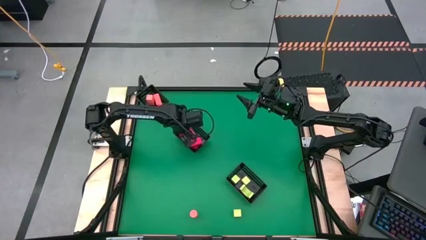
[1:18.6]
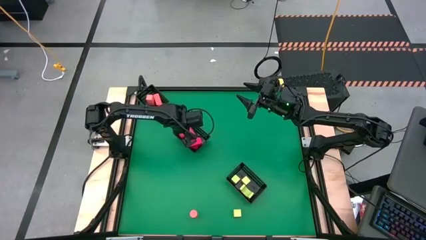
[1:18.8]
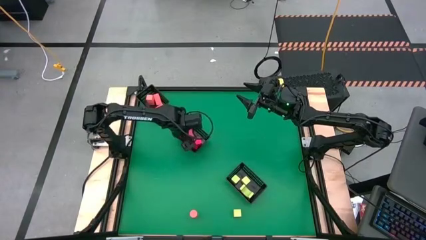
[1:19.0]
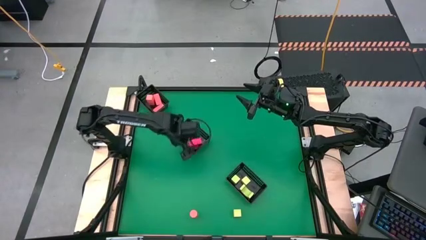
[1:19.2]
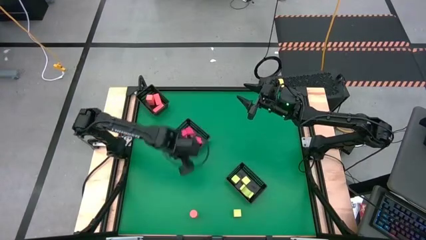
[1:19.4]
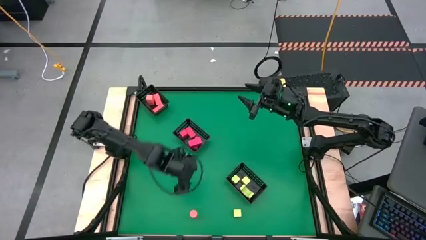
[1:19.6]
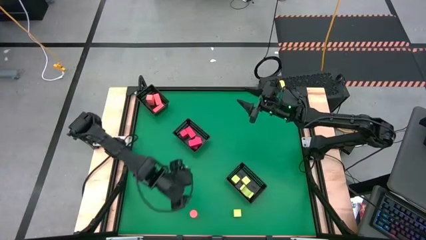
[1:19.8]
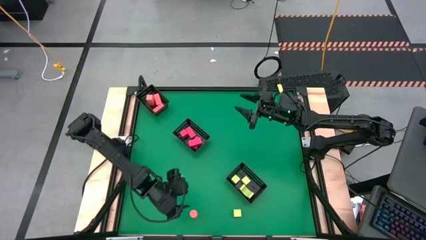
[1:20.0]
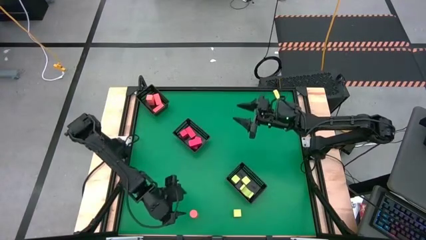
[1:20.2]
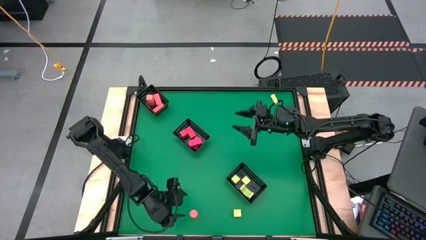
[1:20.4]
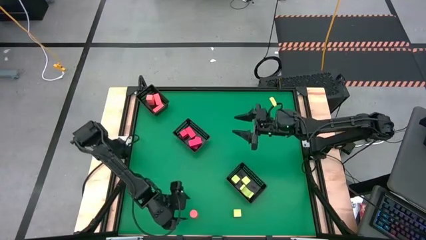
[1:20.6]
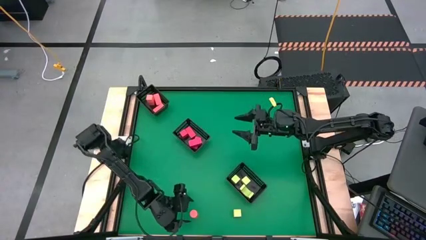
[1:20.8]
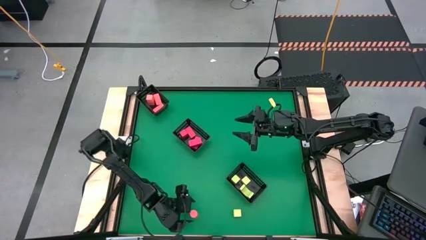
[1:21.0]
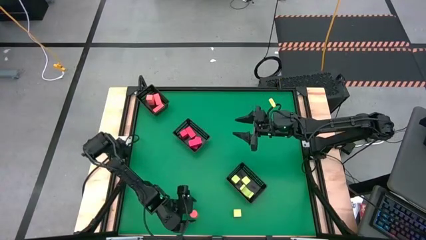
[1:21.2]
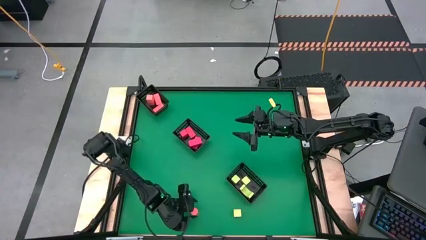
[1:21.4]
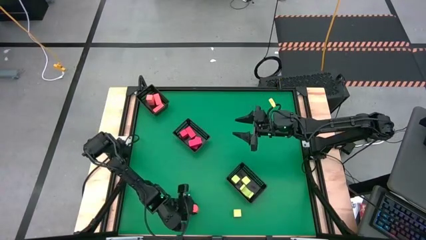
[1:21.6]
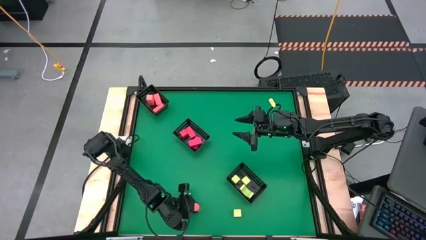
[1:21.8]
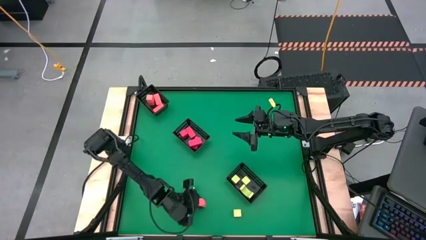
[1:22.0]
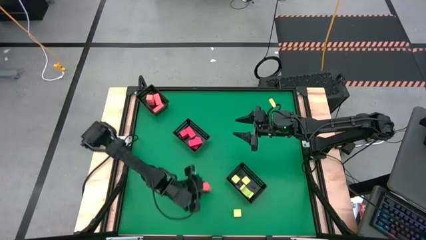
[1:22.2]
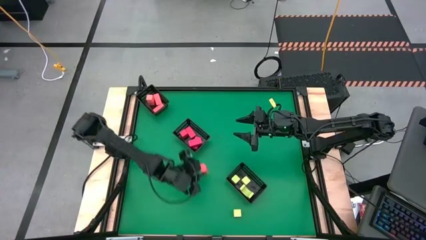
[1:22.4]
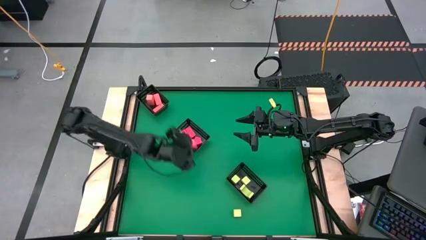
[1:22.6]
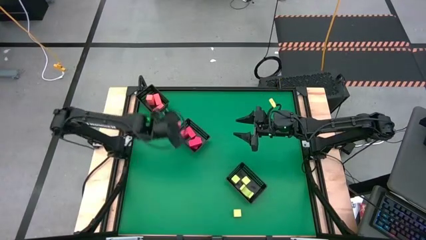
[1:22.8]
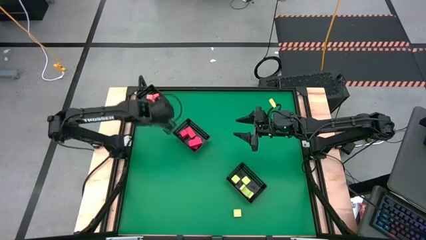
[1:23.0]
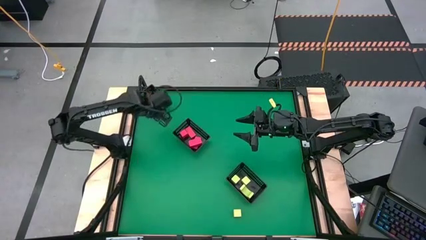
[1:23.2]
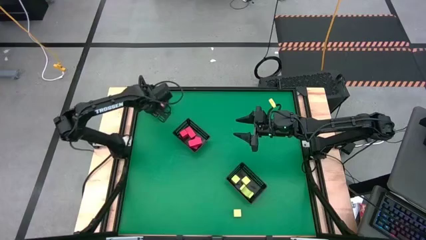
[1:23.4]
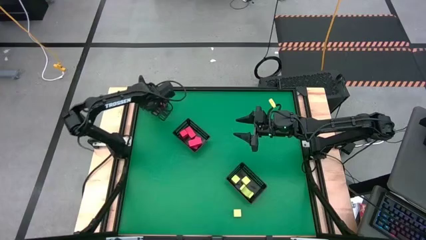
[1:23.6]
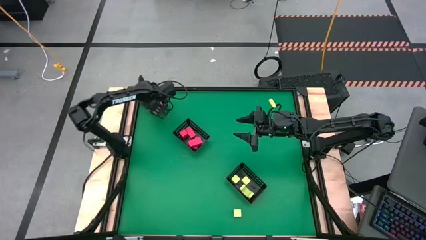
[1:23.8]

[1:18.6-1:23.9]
Task: Sort & place blocks by color
Put the light orange block into the top black bin

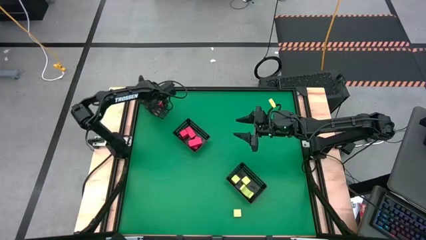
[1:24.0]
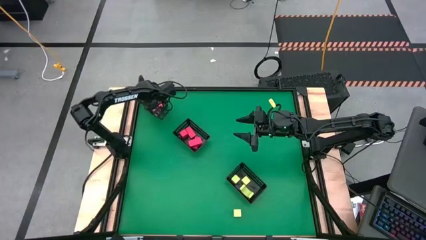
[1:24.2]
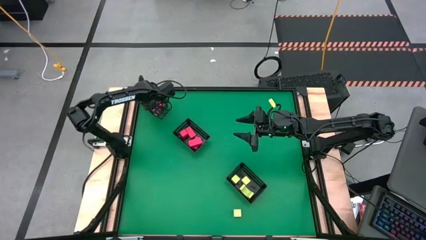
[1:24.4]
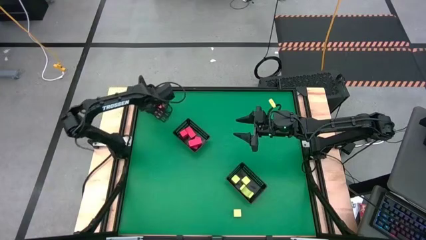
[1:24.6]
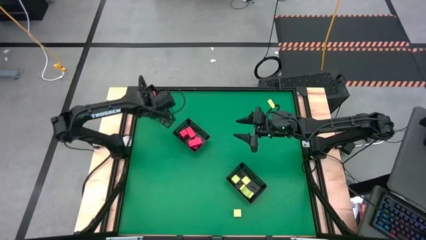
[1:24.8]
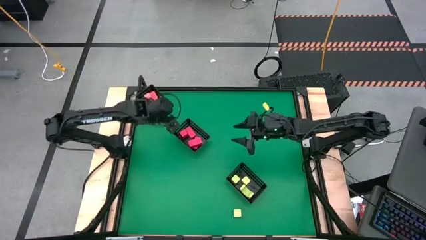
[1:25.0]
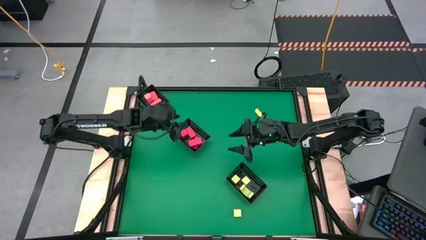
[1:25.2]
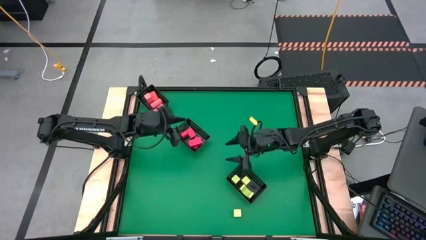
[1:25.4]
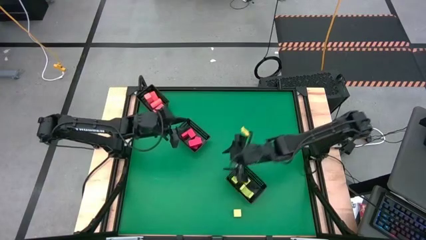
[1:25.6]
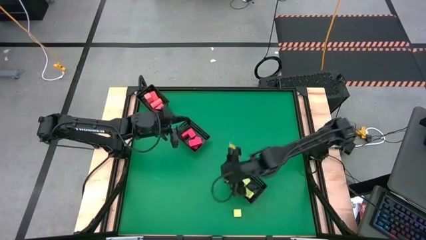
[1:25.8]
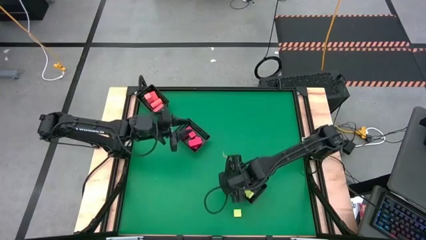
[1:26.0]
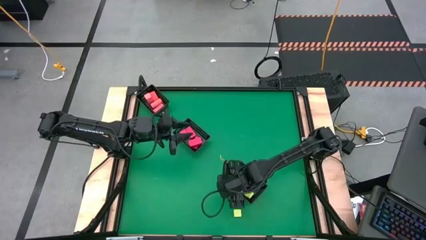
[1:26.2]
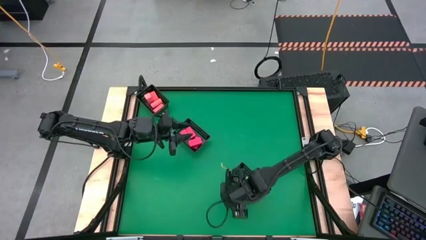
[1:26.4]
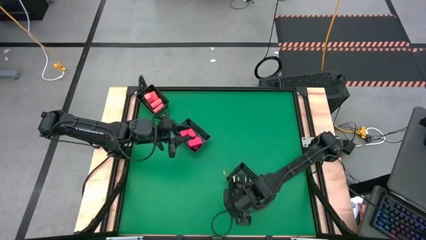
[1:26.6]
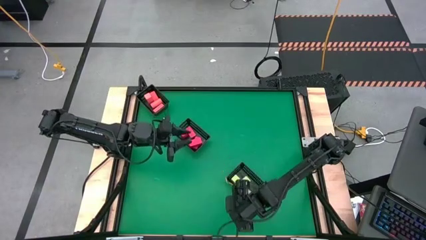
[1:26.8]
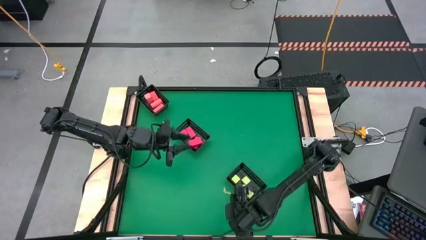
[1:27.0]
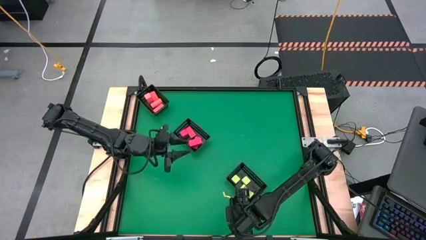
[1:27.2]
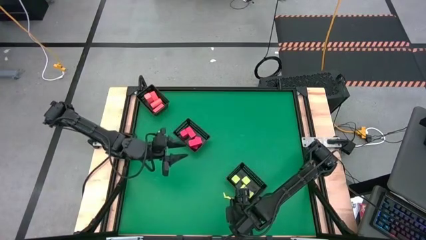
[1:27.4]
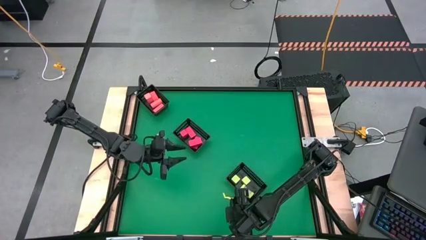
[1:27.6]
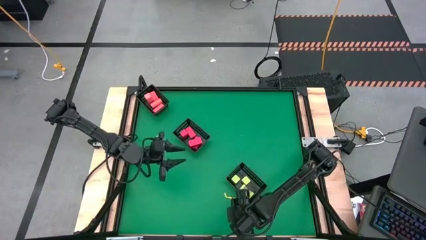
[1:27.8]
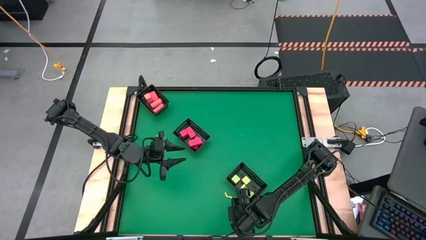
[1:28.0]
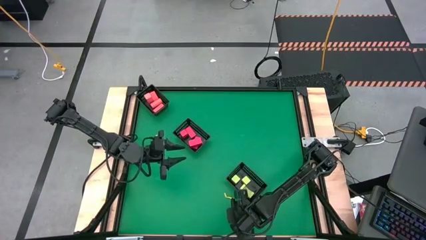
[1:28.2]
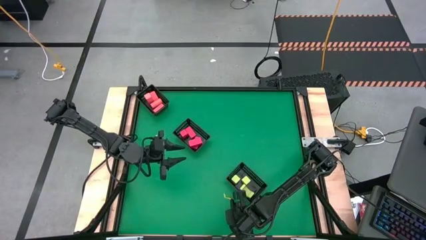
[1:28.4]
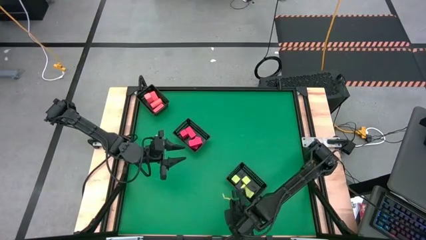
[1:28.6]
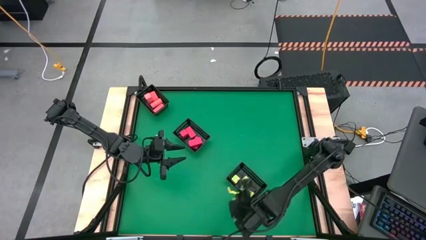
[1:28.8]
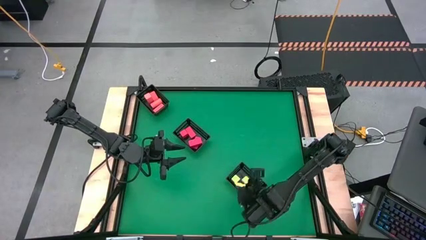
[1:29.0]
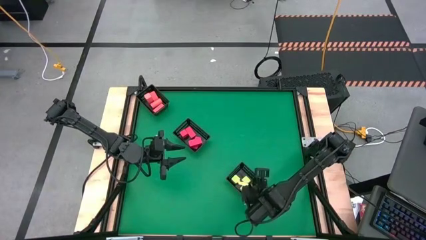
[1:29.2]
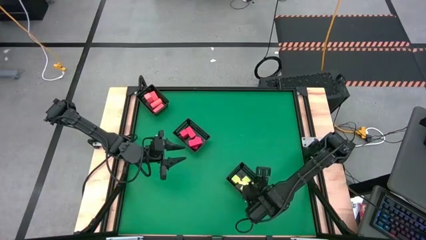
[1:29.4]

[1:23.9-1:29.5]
Put the light green block into the bottom black bin

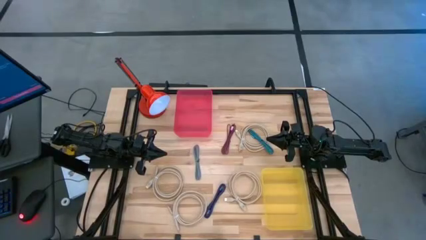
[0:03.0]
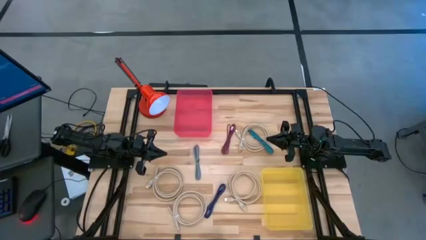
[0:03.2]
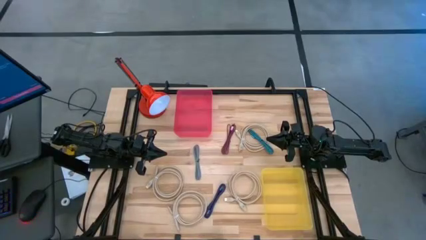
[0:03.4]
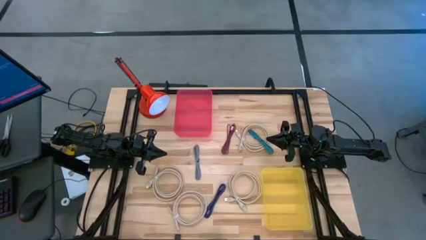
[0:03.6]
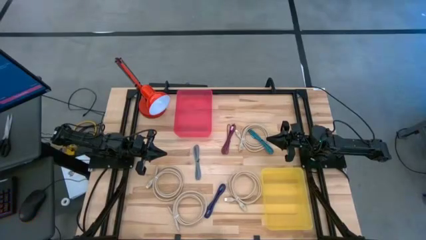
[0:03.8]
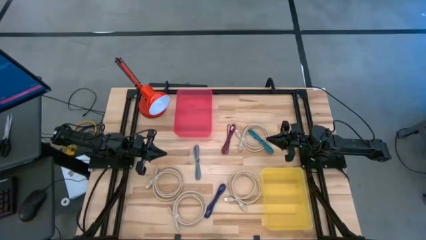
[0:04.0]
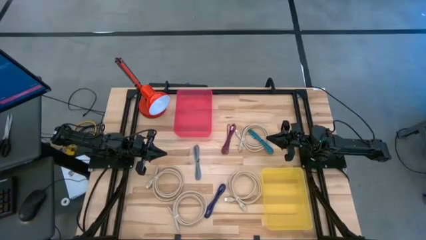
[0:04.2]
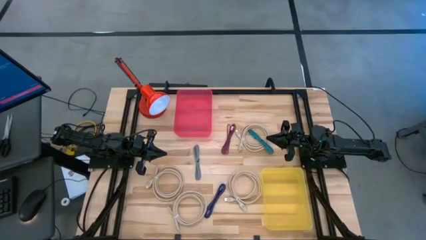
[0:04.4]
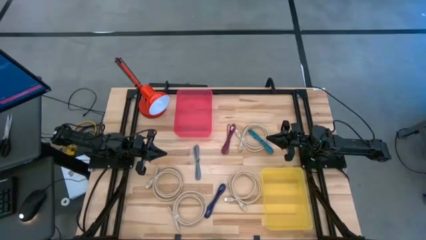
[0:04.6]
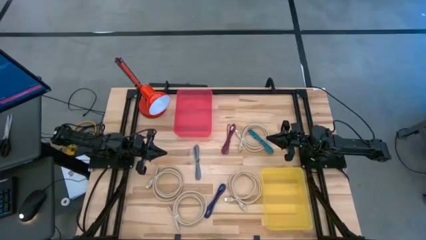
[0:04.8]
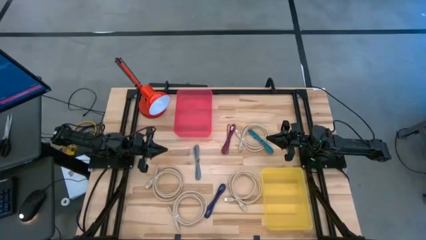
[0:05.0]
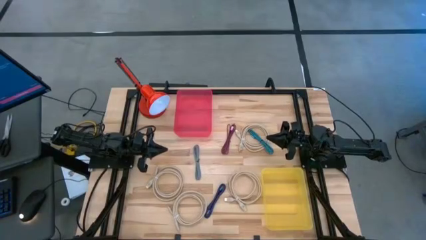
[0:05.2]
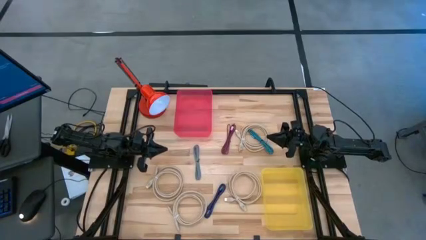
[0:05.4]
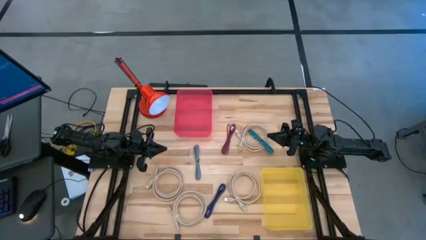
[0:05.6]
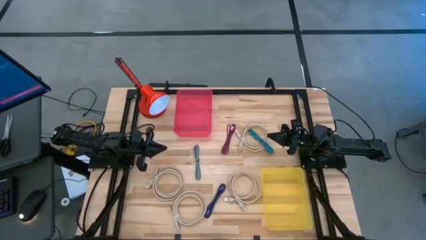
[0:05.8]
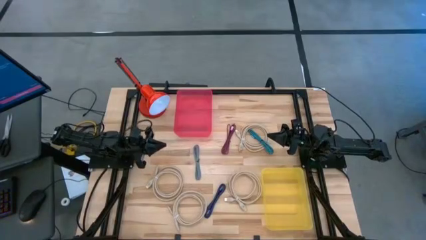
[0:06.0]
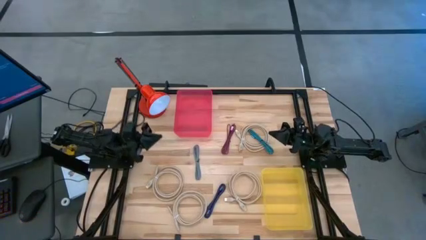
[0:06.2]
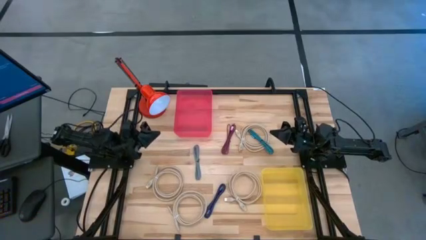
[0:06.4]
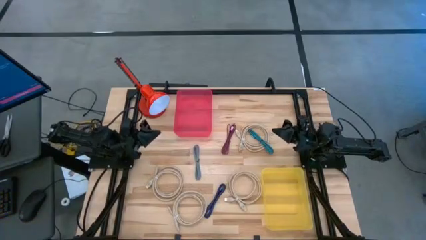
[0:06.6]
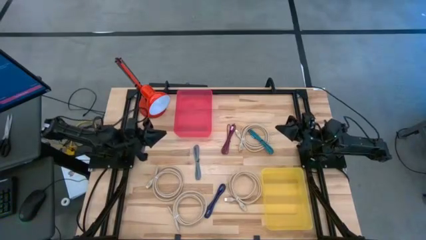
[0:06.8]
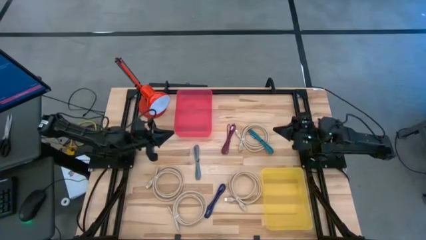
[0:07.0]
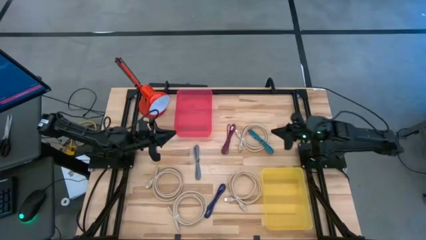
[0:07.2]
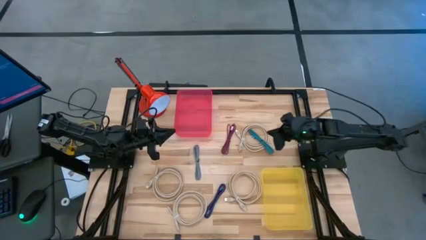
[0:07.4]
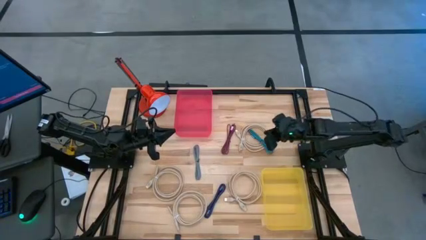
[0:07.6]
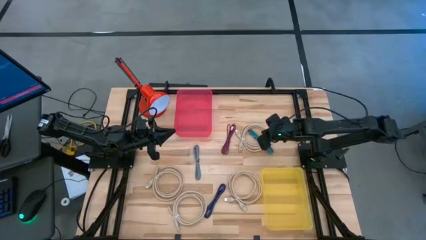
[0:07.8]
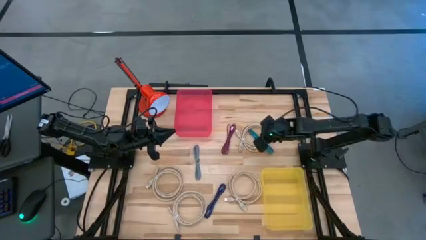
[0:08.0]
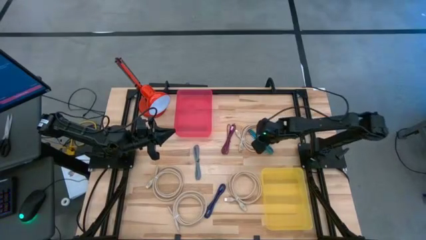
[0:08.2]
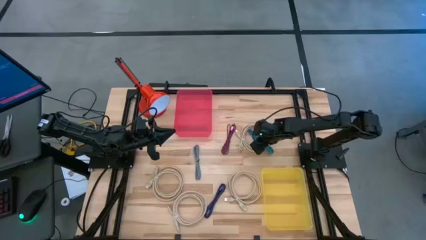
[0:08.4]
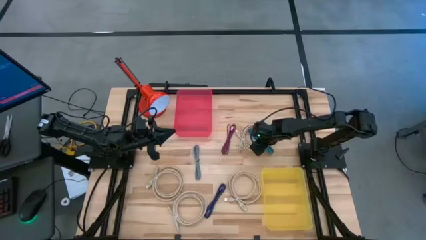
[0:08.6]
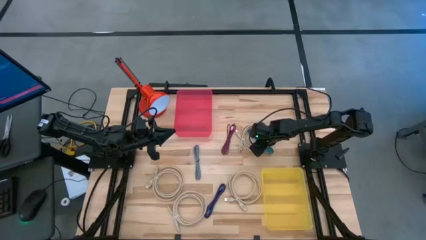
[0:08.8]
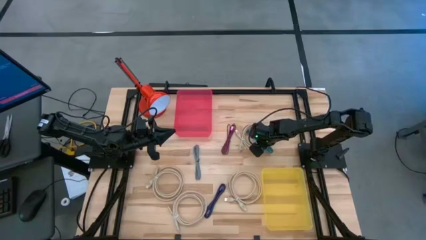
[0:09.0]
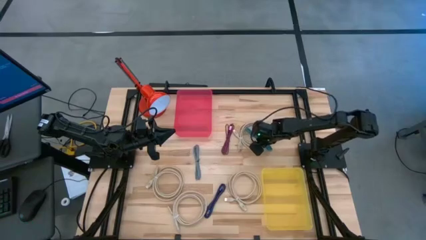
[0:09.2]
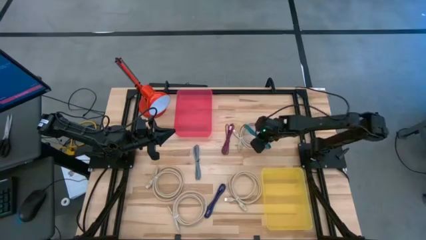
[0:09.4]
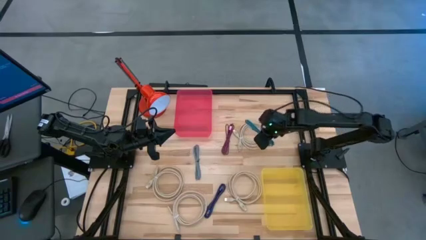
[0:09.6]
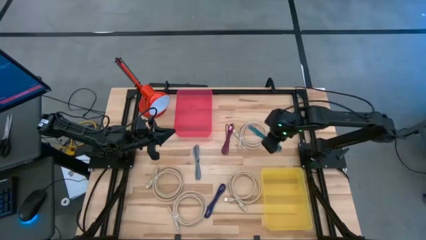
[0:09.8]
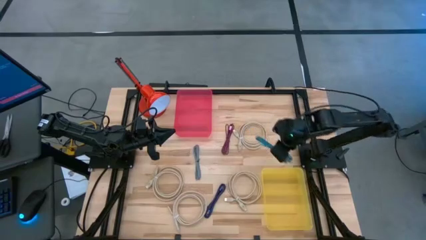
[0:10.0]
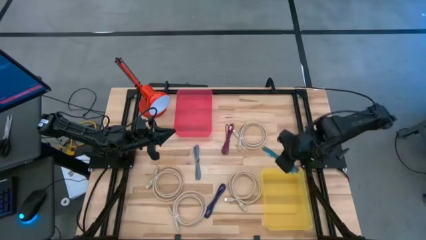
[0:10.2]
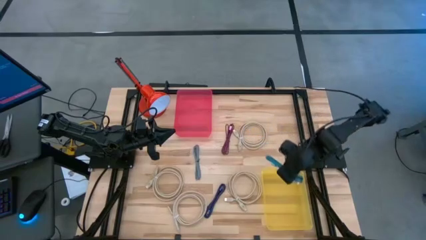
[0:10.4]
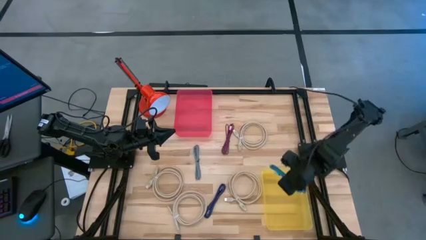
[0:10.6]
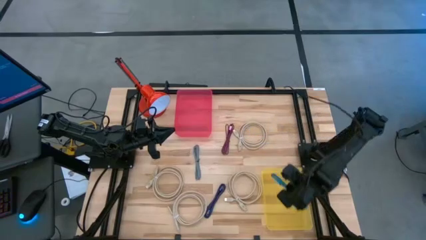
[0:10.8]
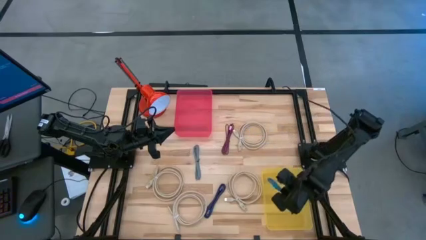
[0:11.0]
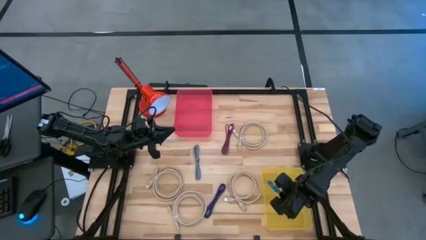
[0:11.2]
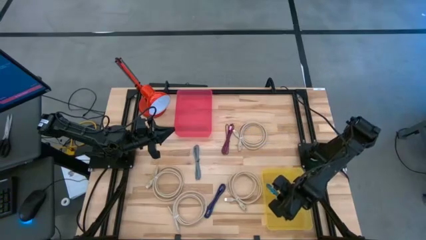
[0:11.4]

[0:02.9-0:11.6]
Task: Pick & Place USB Port
Put the blue charger cable into the yellow bin
